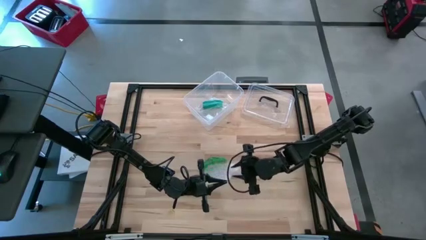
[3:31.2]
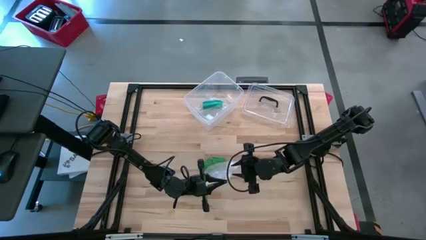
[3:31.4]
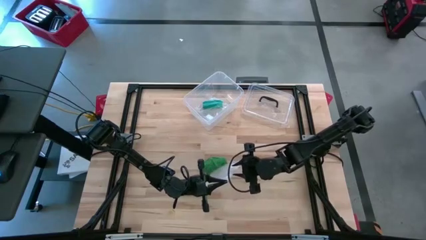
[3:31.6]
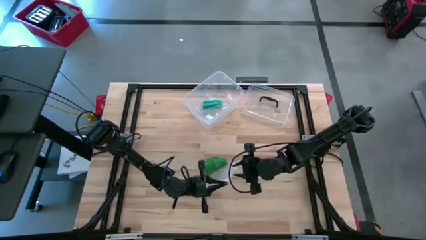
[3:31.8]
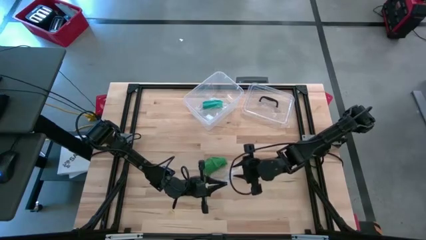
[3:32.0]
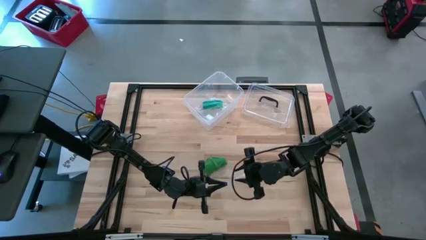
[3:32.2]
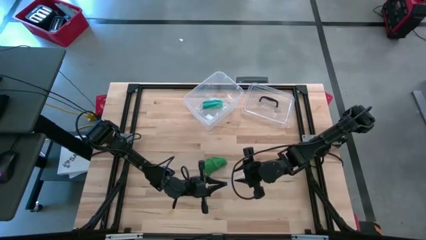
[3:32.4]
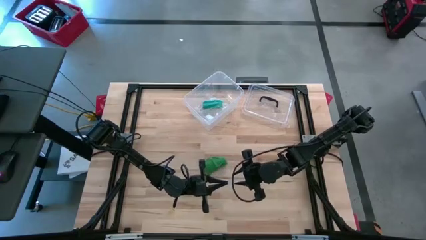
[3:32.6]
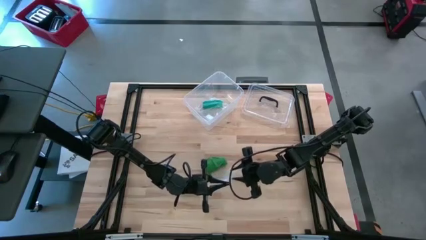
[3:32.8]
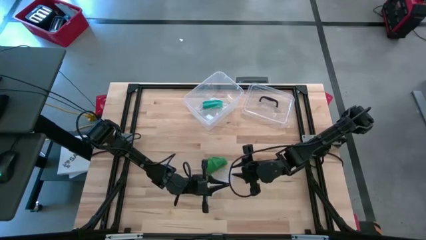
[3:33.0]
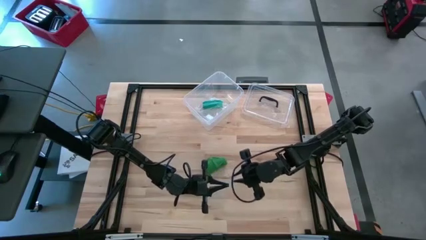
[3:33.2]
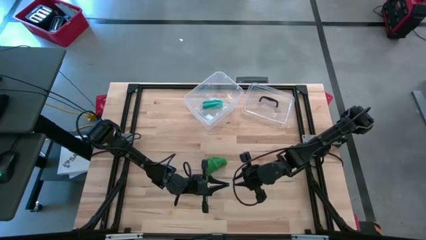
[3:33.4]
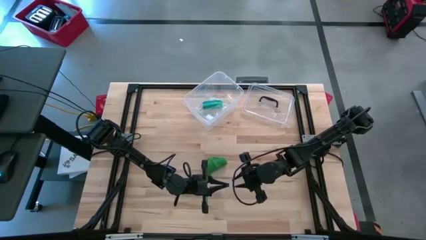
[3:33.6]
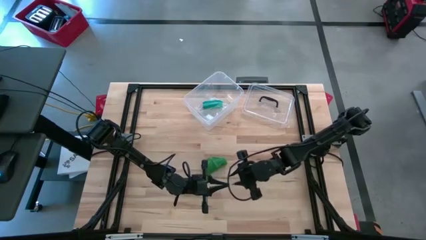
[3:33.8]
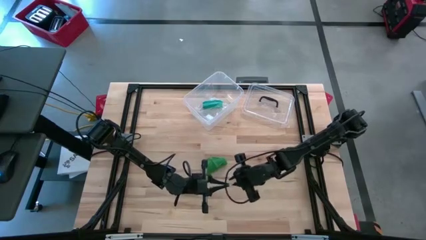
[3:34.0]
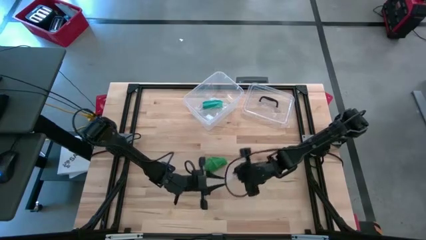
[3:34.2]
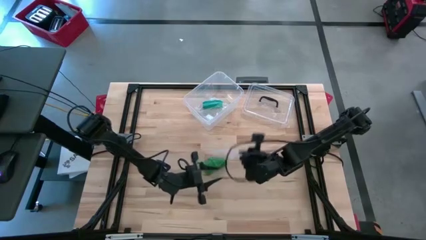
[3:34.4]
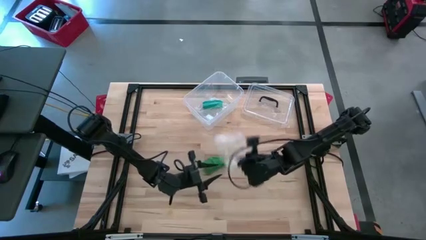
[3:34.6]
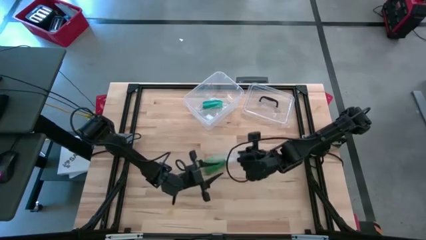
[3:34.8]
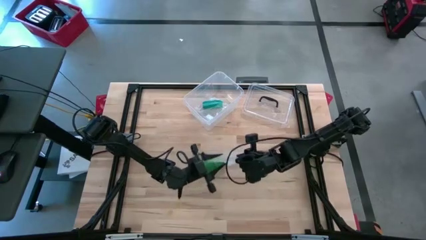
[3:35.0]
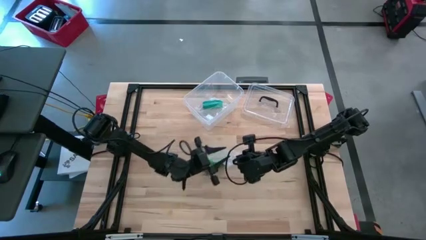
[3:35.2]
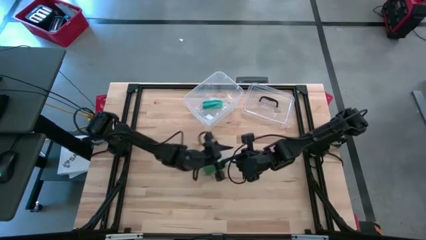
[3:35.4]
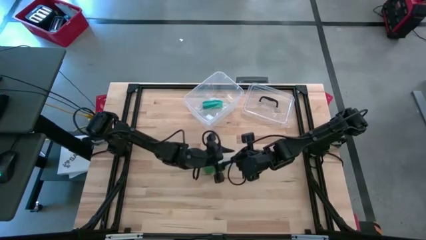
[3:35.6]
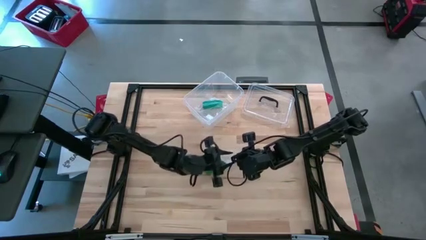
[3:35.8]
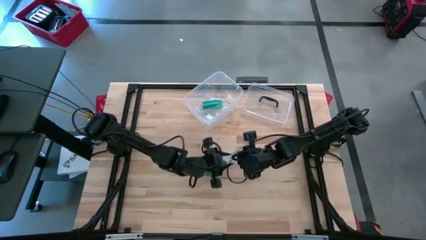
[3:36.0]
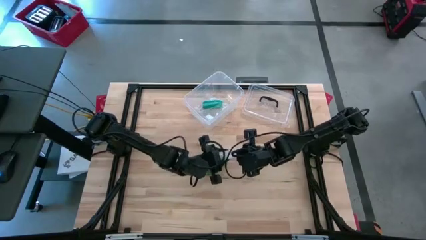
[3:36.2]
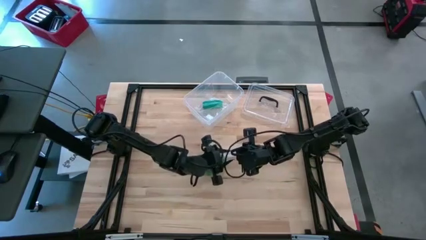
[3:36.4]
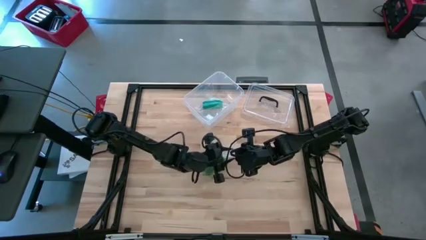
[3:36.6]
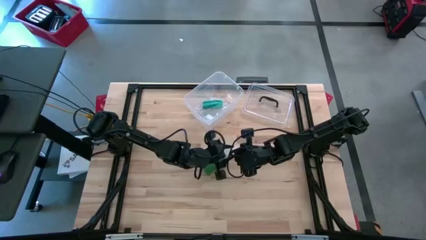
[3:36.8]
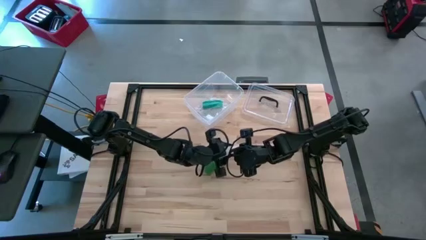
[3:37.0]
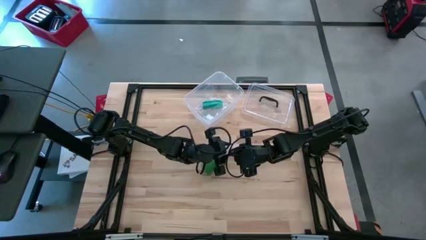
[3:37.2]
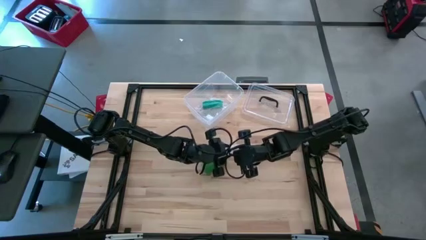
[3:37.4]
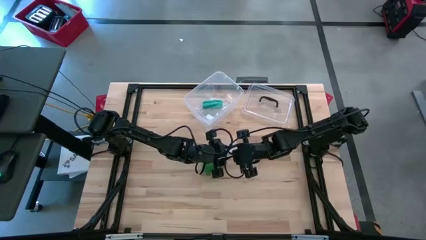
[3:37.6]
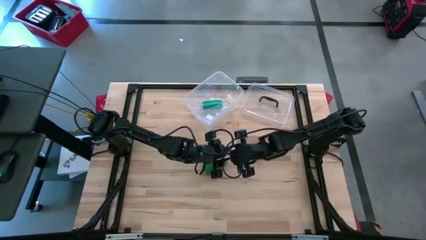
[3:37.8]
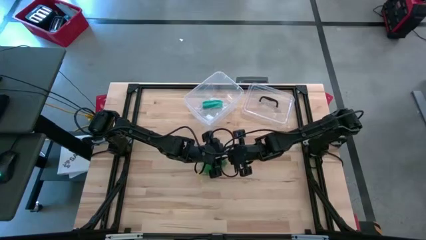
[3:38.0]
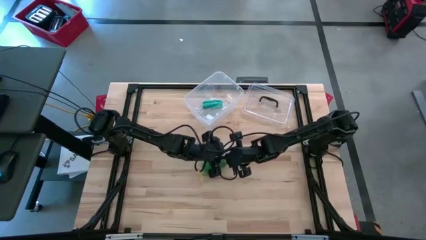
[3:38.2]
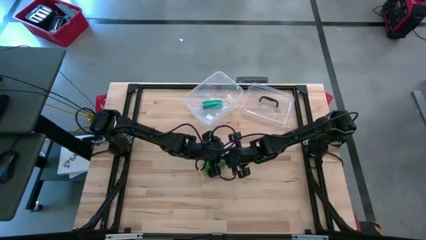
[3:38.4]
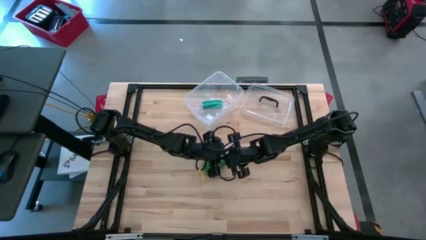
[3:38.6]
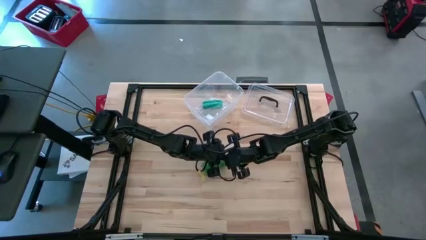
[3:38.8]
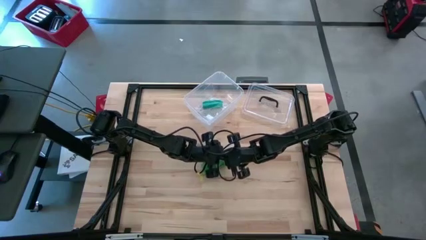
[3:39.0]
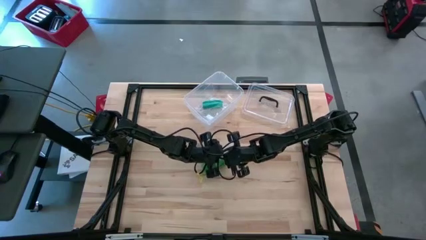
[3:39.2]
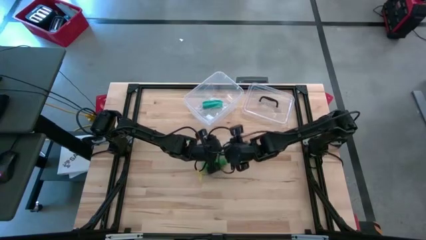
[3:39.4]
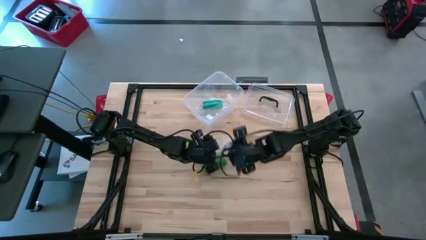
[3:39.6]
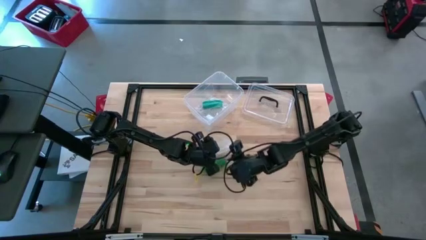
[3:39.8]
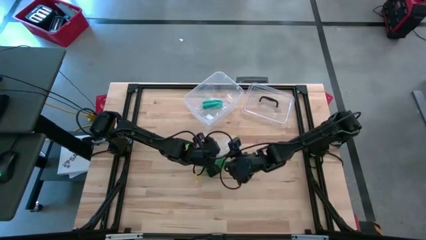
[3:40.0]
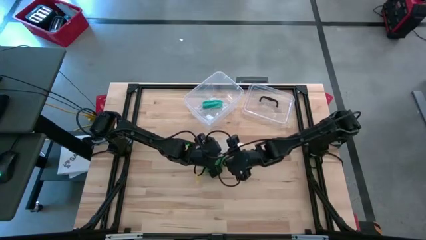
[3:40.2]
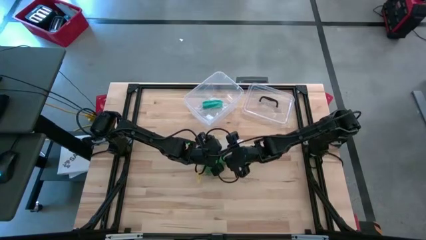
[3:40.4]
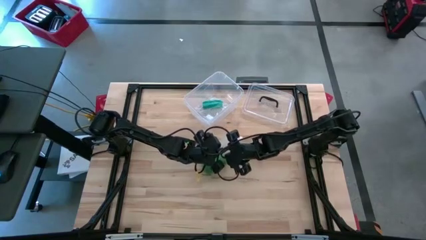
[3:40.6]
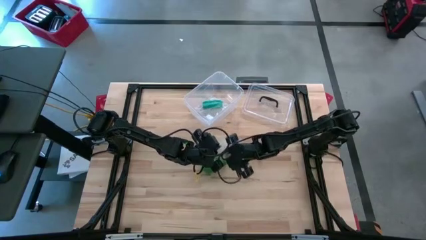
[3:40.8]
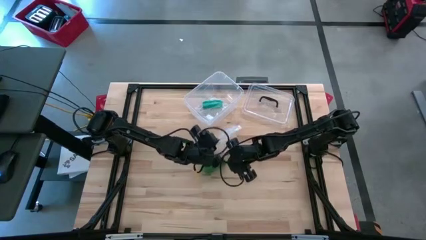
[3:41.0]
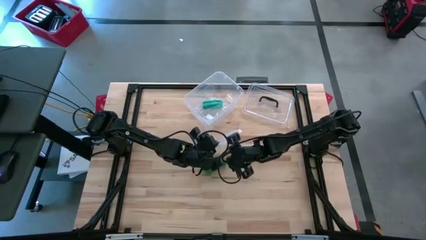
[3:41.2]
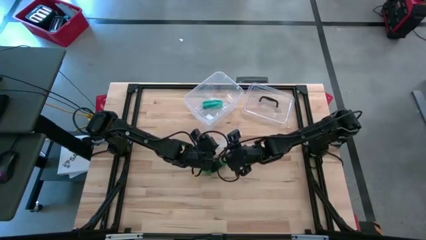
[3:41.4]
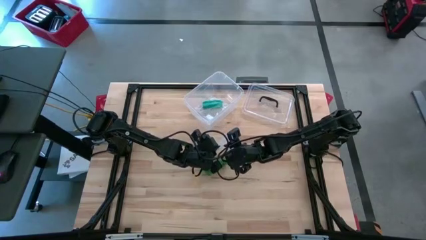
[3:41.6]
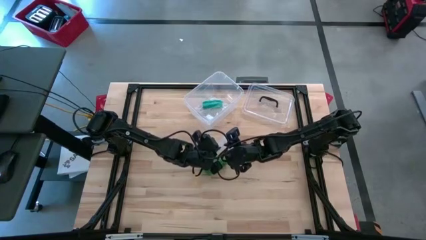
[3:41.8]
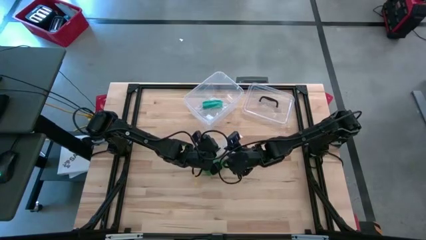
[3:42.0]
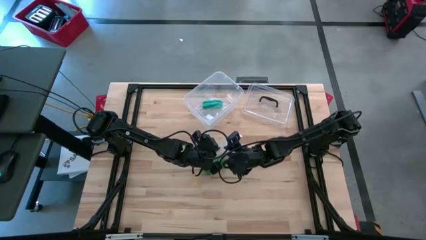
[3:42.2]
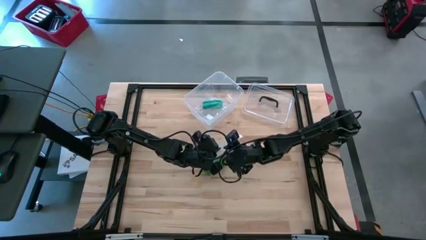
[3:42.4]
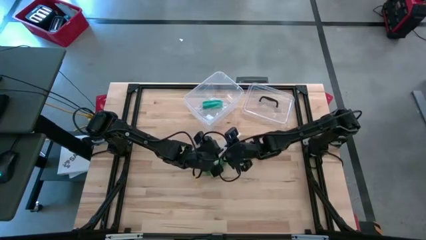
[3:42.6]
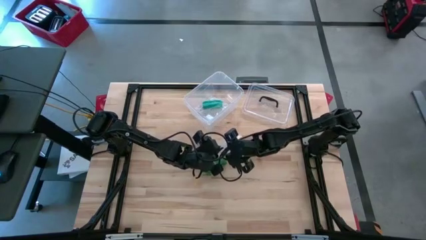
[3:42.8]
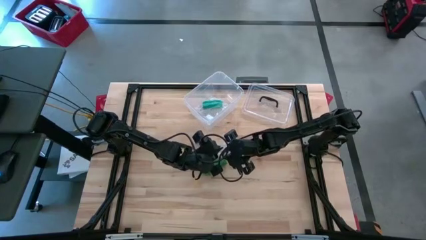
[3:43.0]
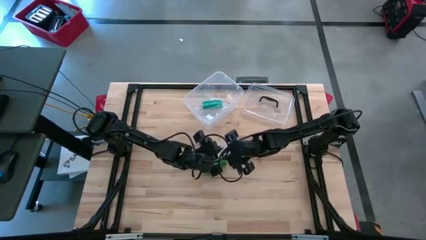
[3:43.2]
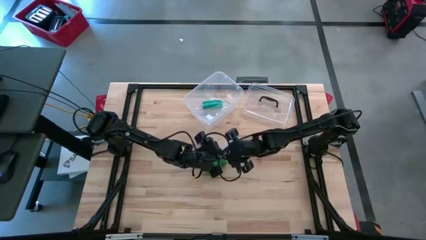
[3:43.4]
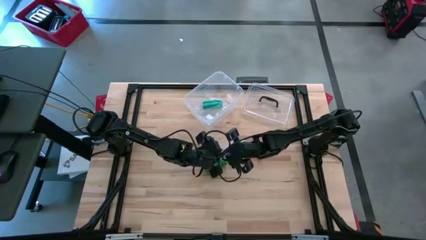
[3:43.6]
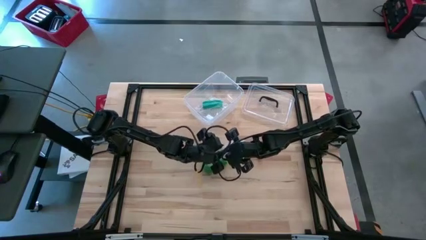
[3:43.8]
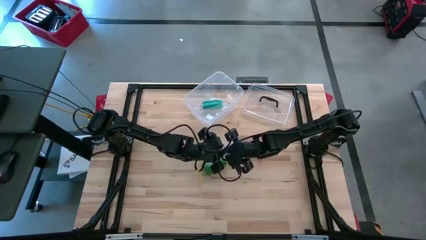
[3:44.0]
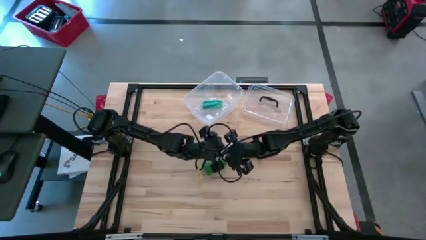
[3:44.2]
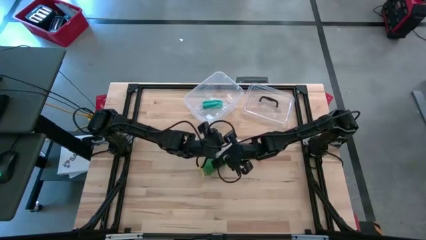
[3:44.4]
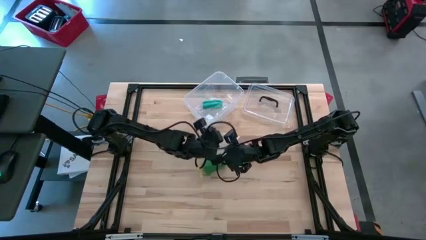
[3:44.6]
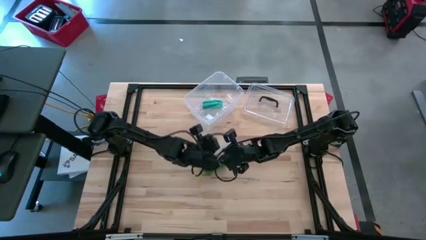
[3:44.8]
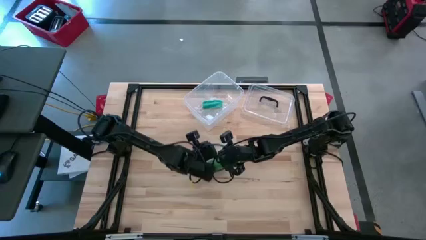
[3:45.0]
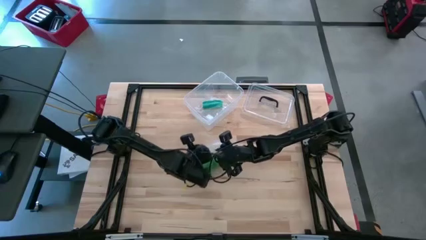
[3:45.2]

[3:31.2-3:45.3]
Task: Roll bandage
Open the transparent zip bag
